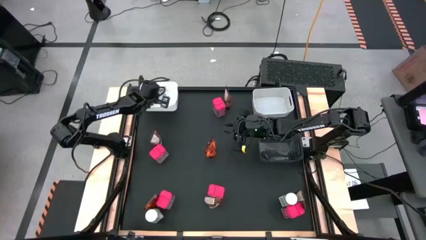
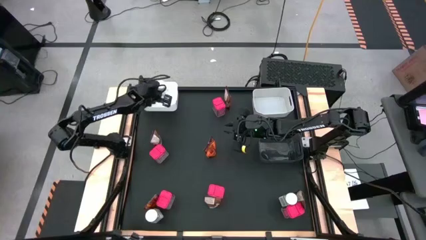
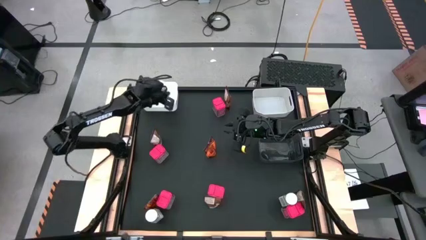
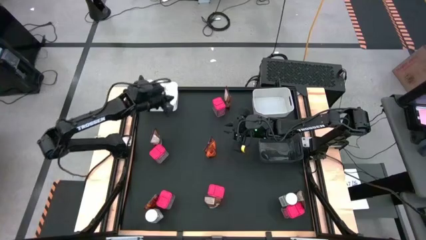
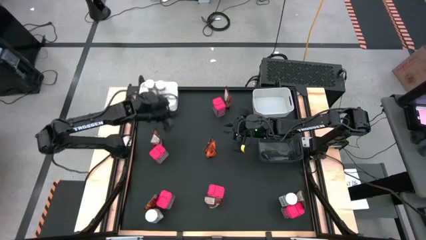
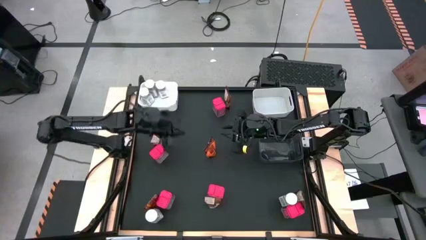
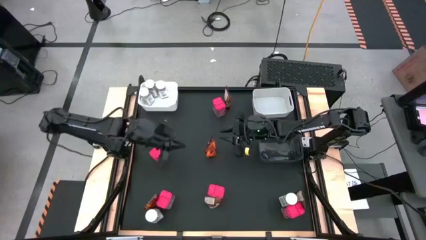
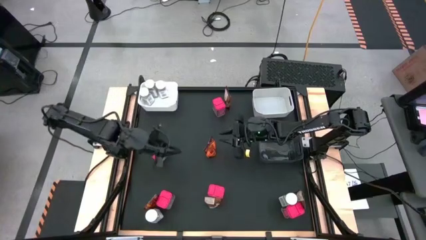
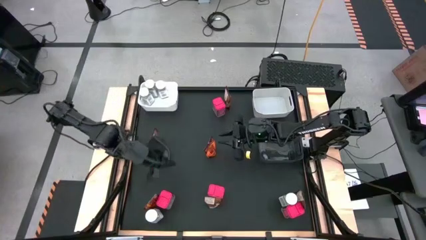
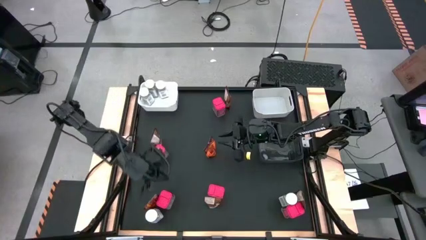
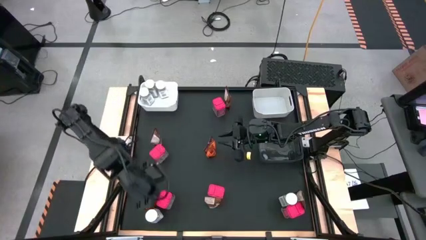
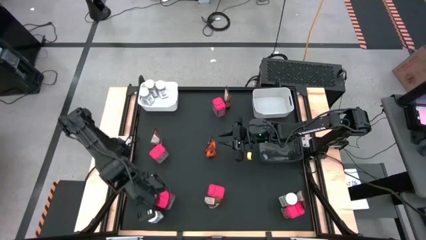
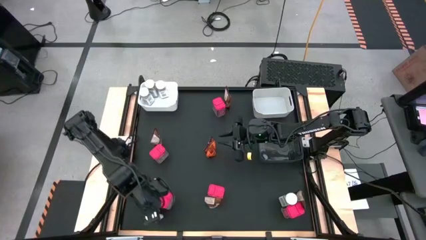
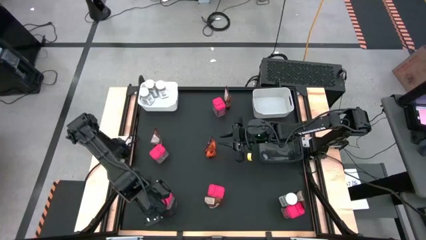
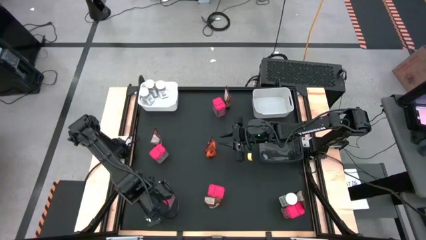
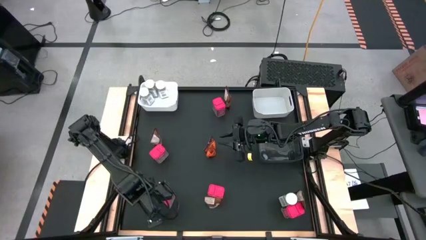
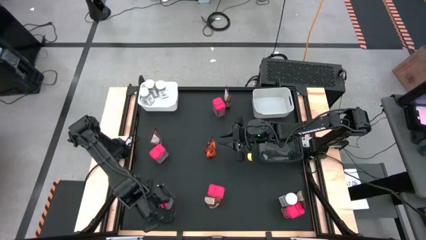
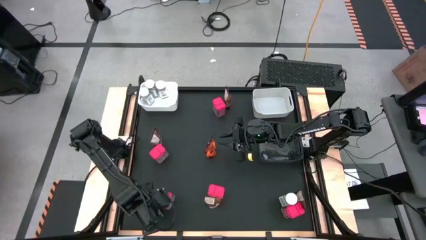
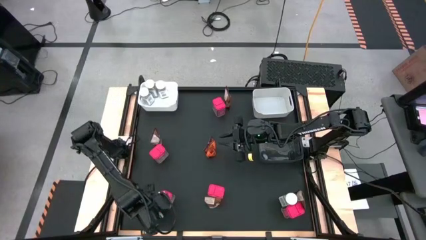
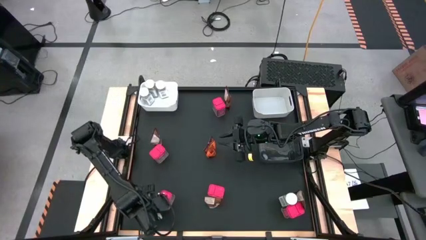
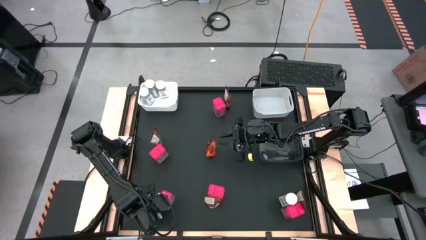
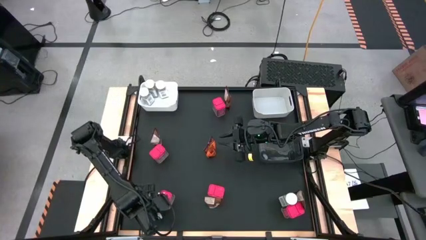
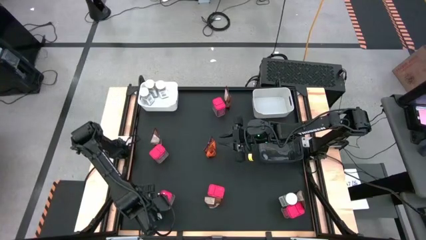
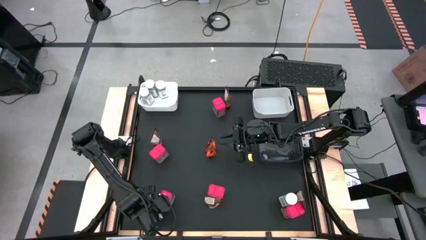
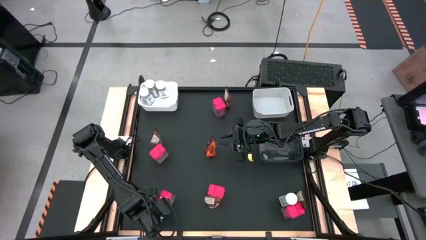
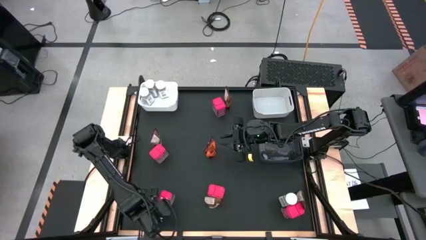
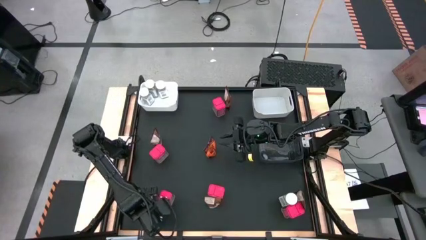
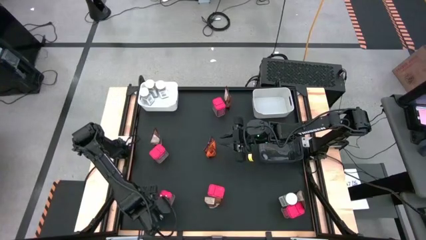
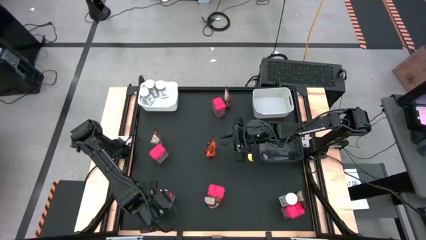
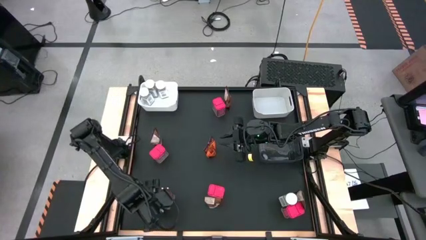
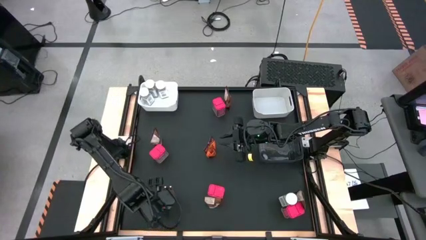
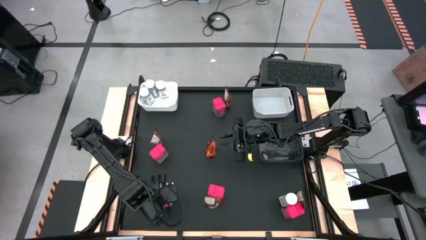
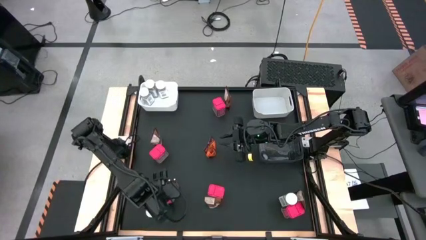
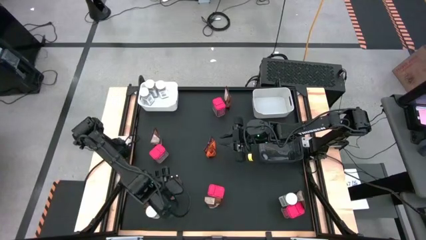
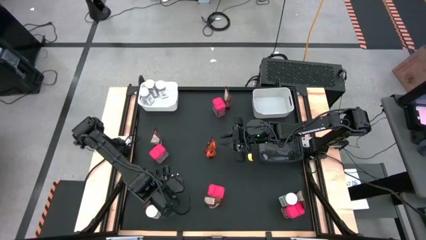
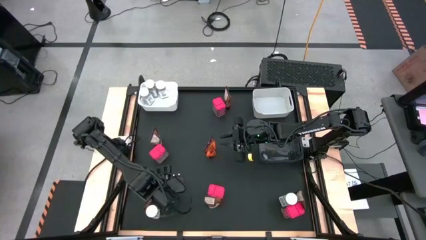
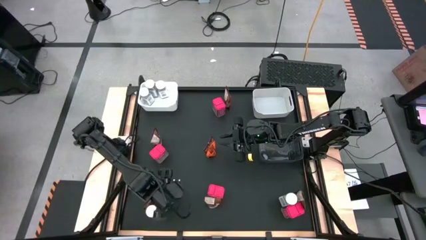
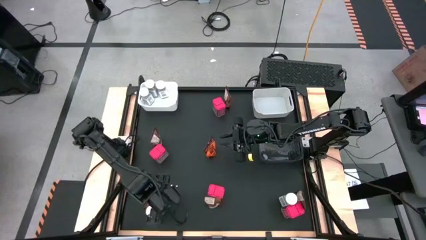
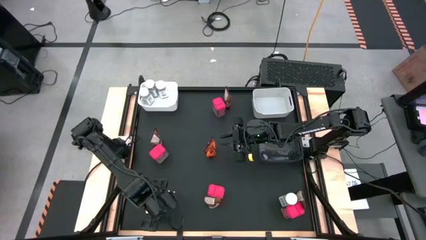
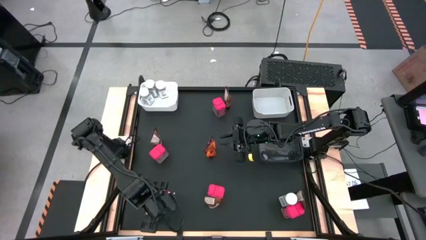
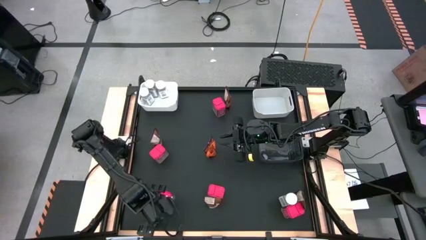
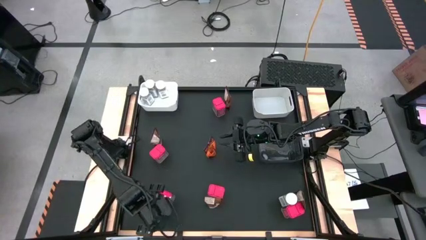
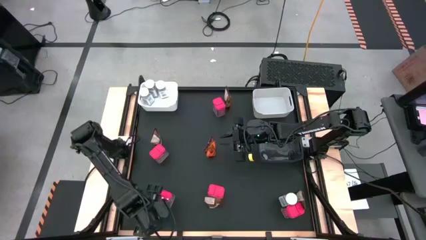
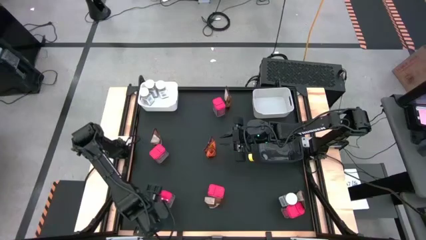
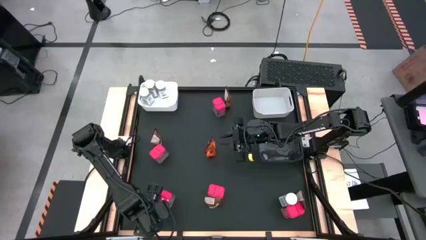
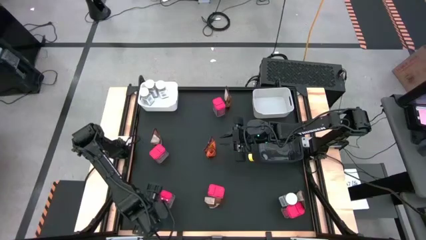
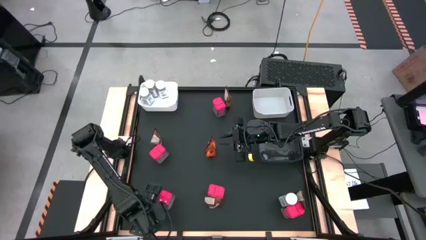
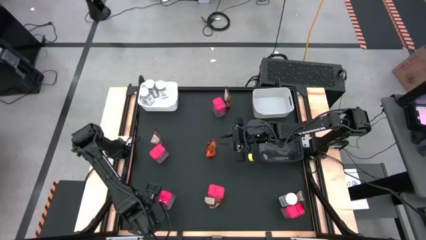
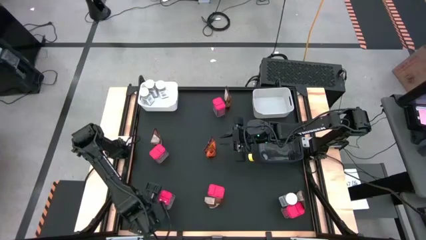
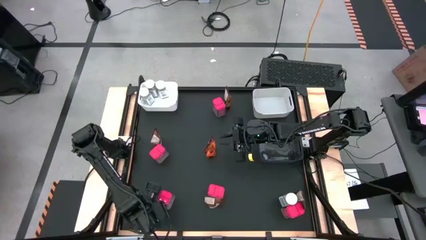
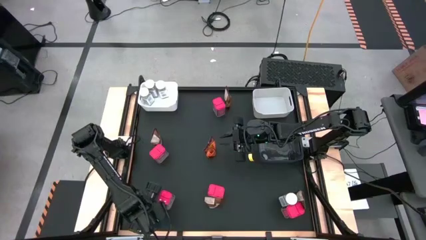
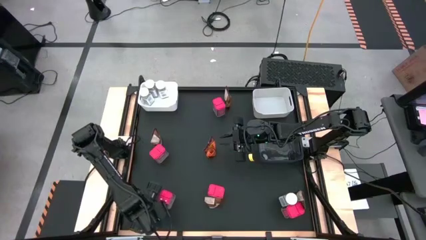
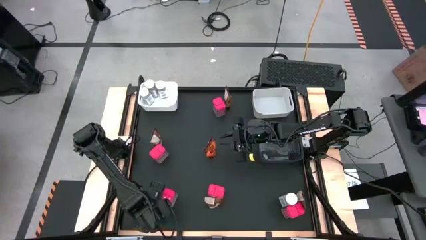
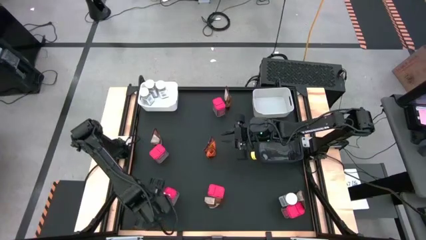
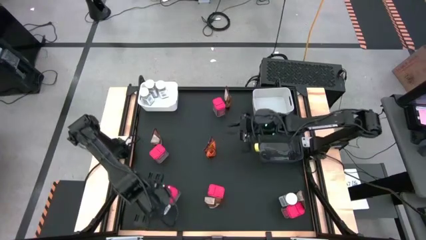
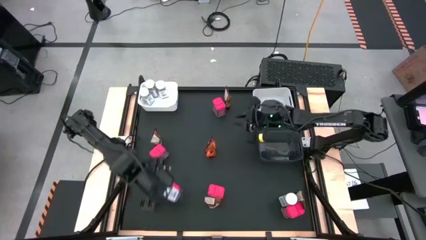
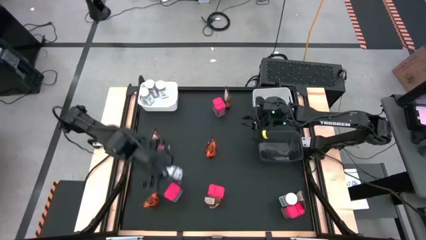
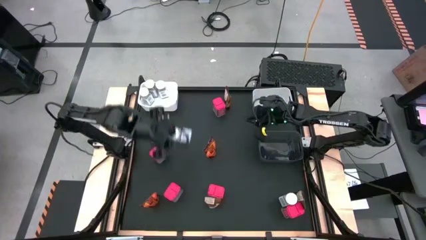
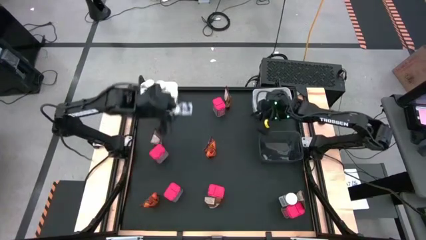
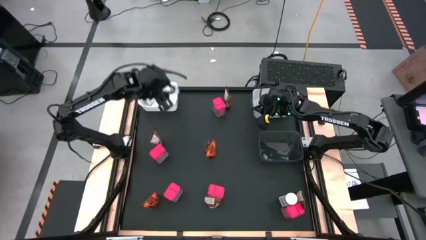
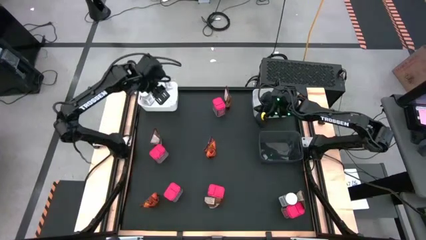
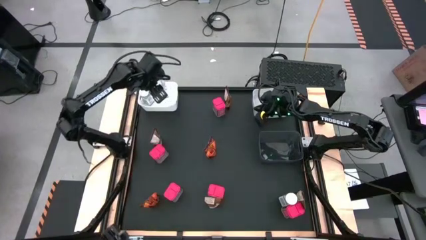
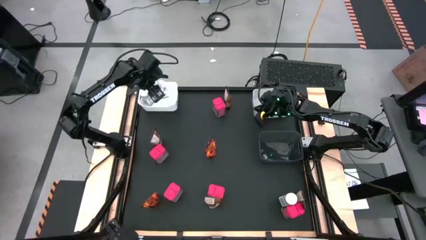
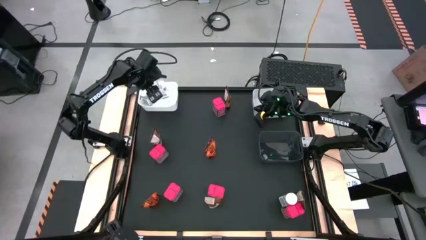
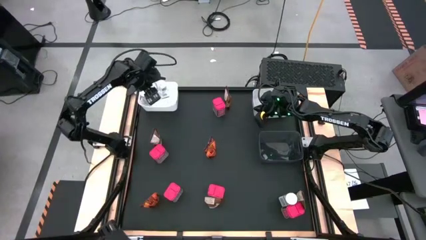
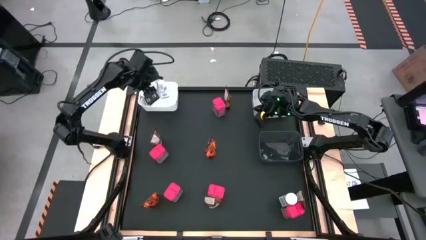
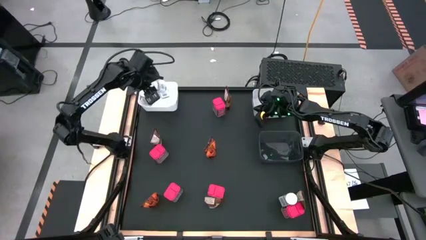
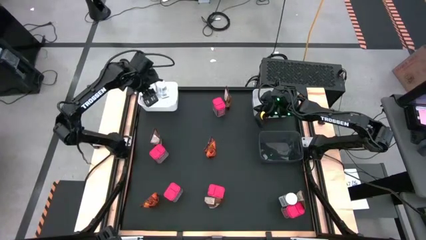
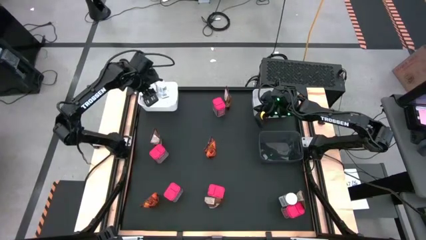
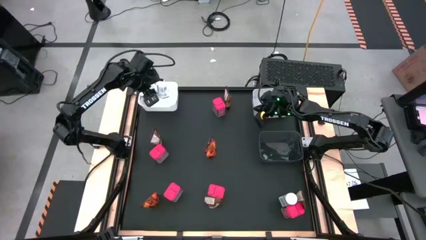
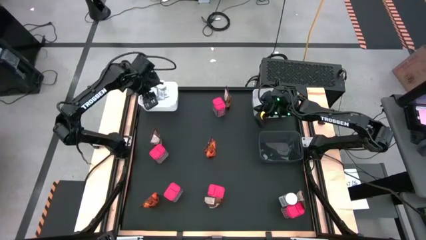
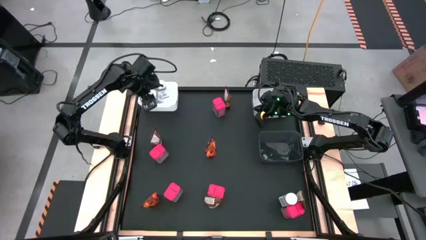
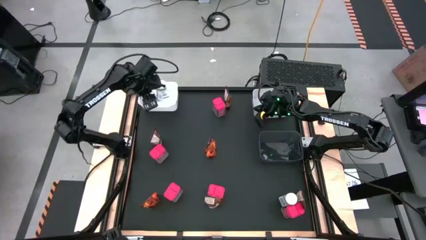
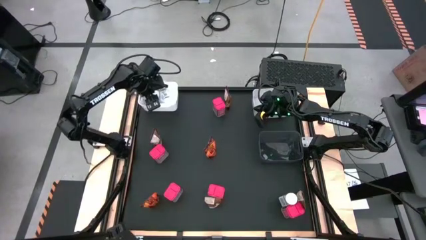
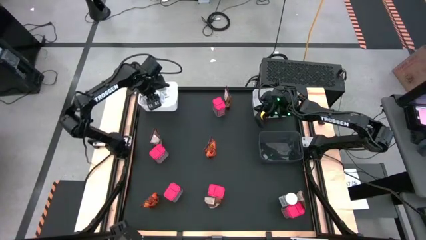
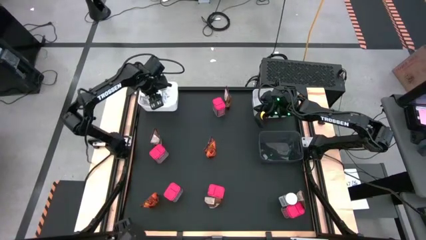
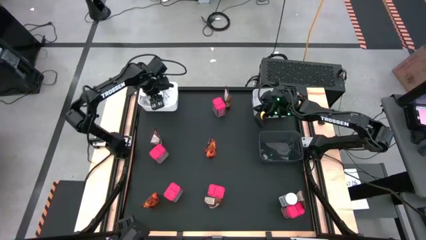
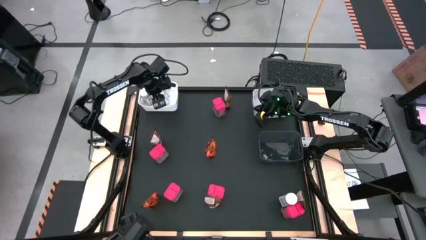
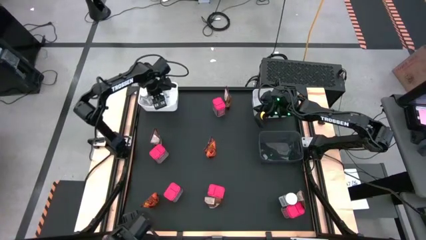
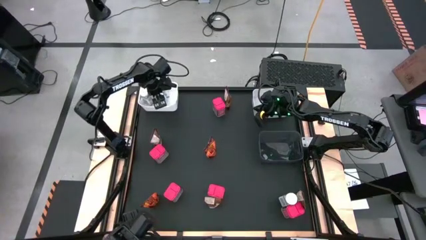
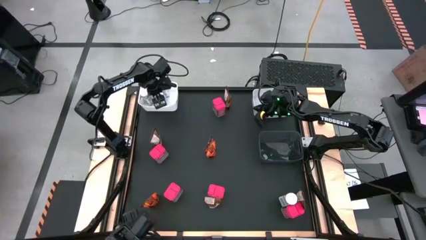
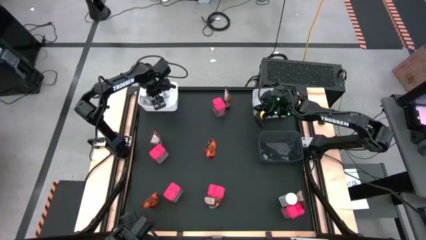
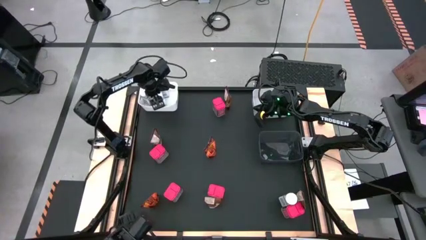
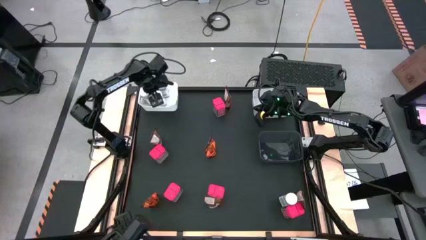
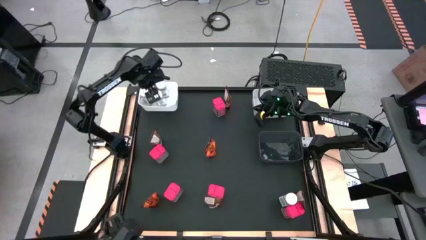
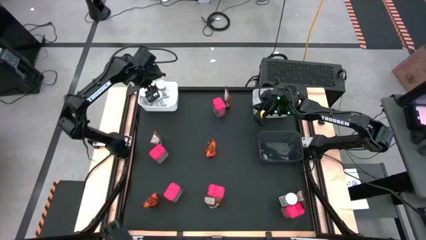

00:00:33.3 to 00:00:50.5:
Task: Sort spices by type
Put the white seasoning bottle into the left white bin
